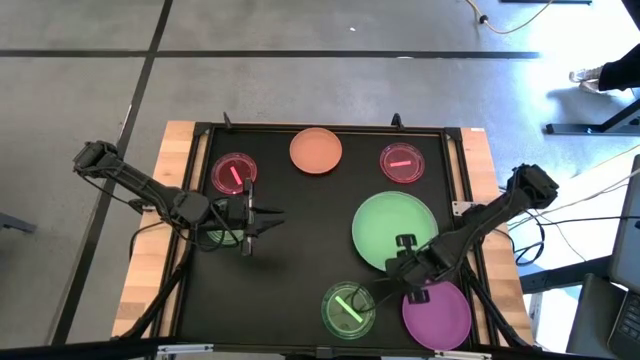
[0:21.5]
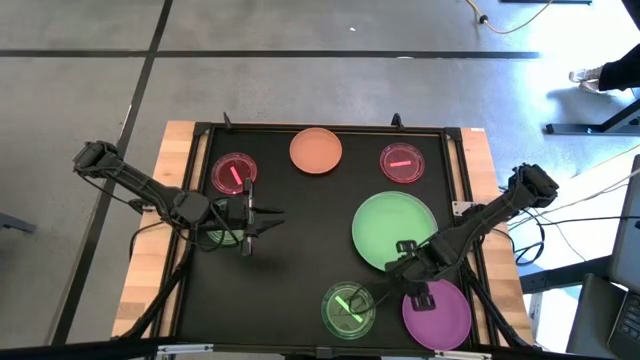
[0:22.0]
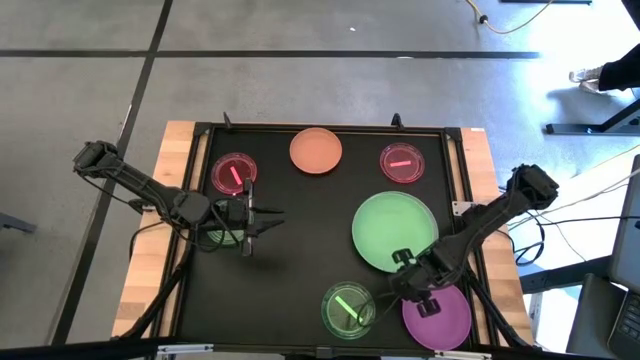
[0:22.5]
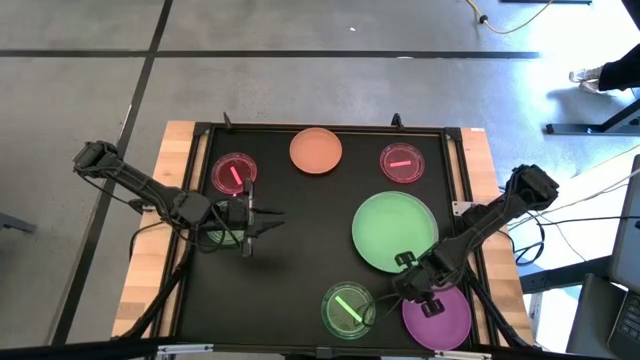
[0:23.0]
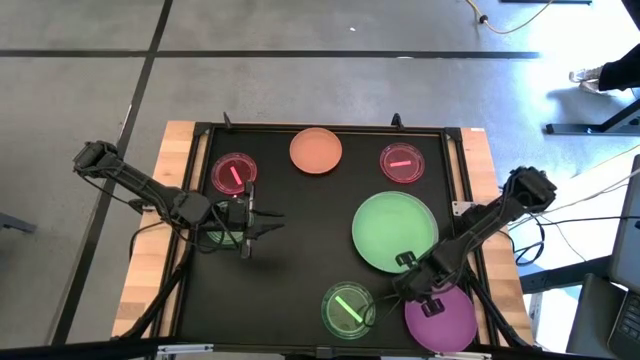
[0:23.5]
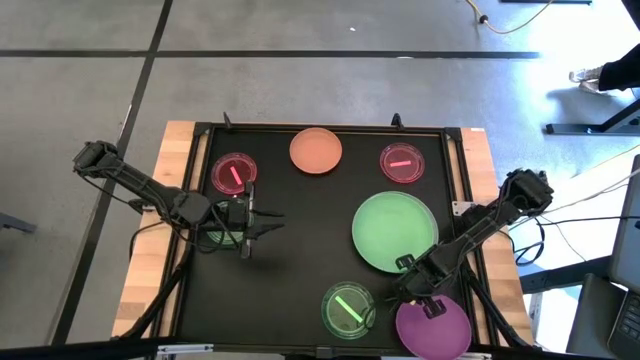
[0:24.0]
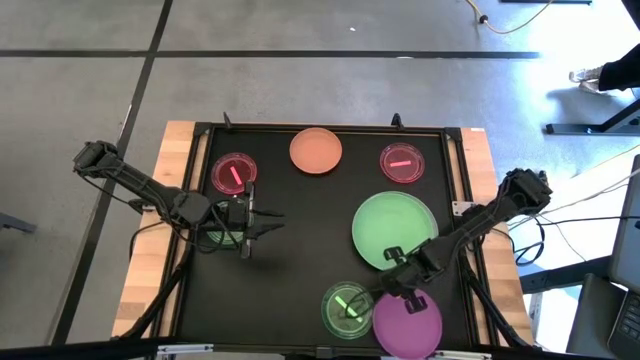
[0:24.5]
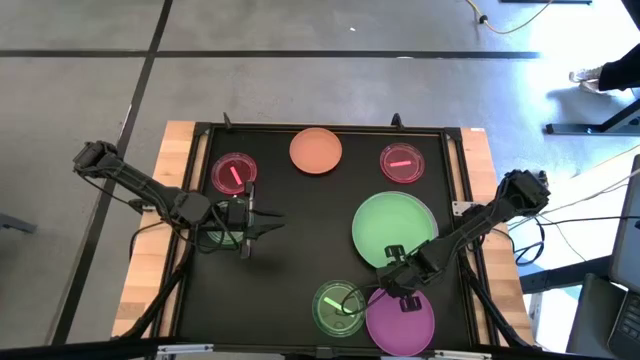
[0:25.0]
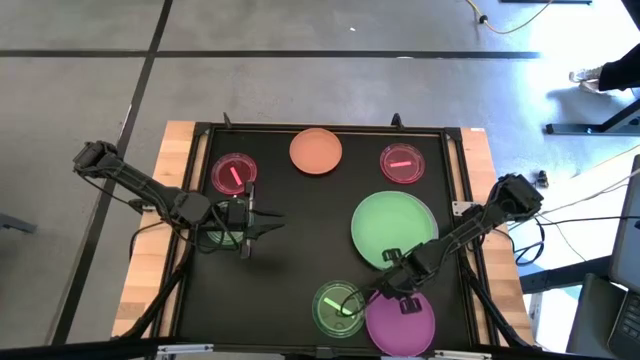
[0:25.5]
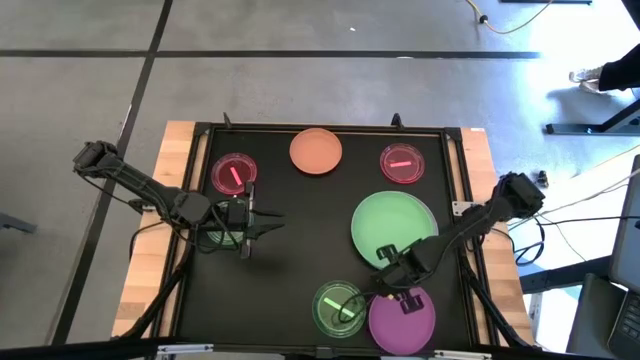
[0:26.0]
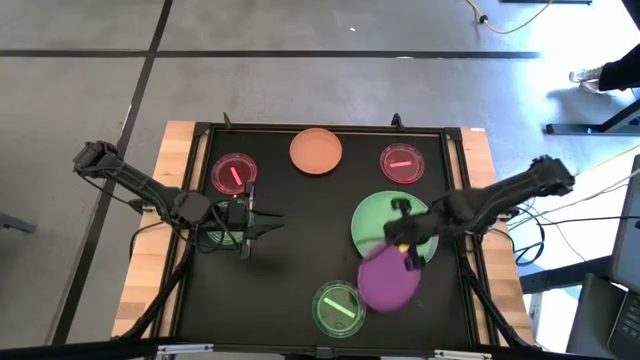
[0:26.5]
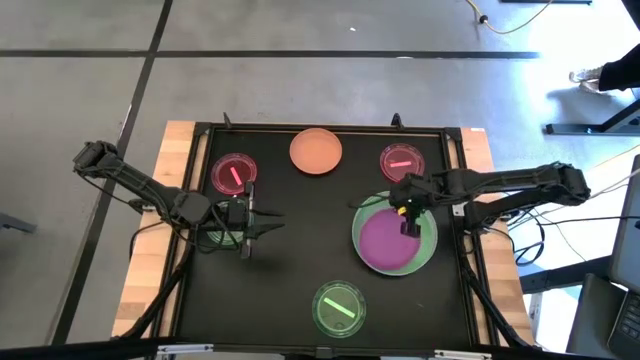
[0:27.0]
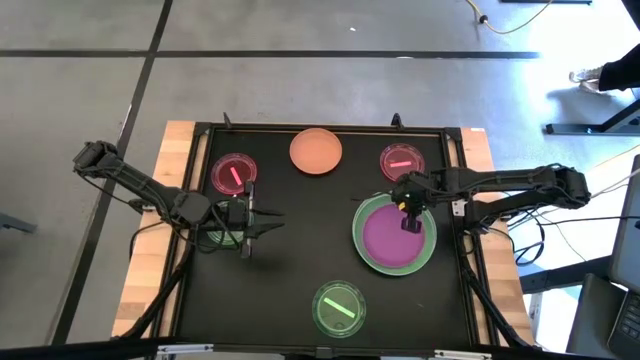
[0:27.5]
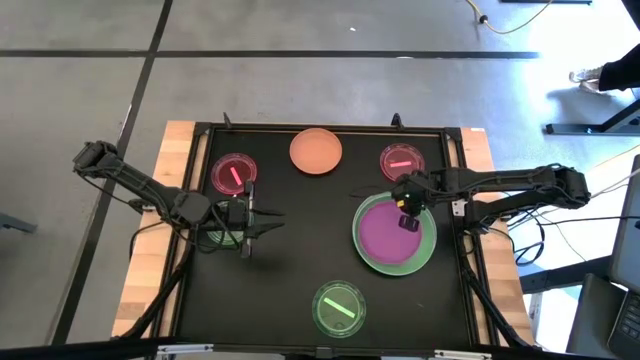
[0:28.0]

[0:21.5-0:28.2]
Task: Stack plastic plates
Stack the purple plate on top of the green plate

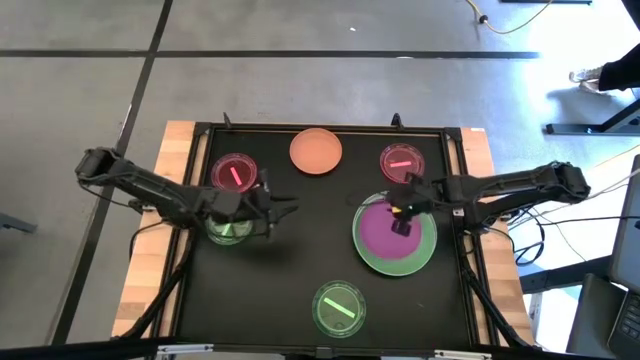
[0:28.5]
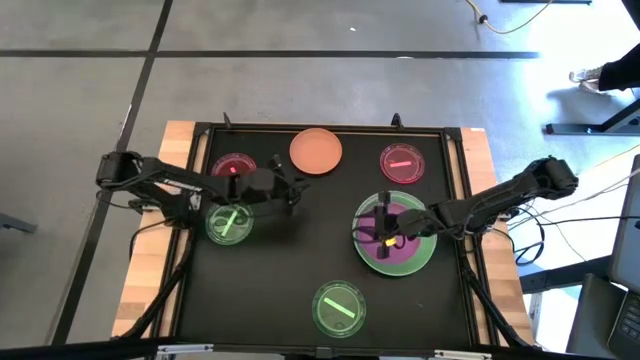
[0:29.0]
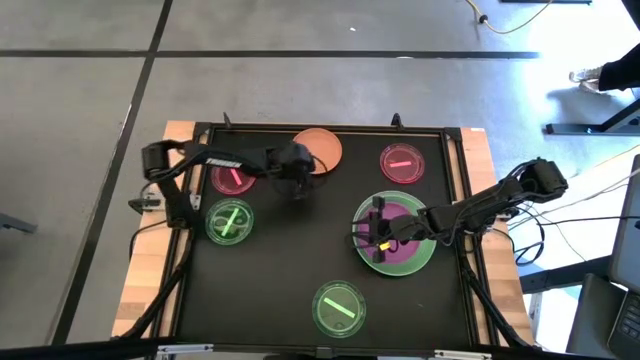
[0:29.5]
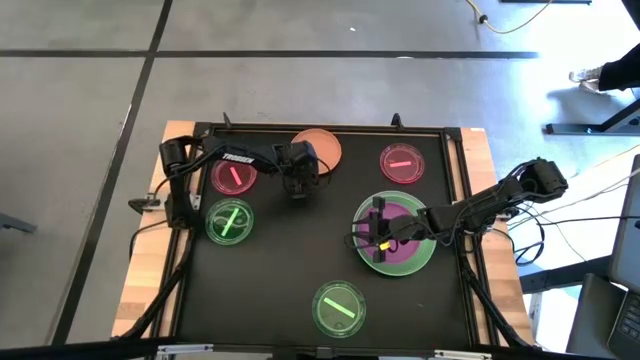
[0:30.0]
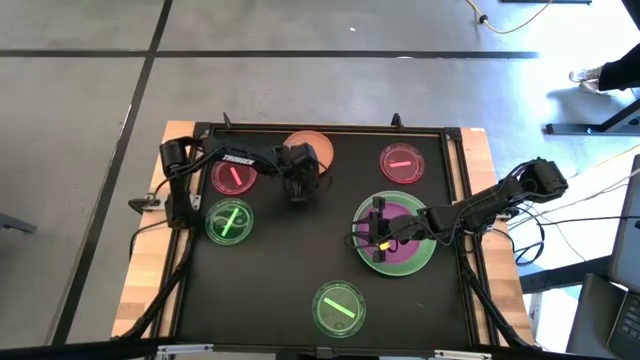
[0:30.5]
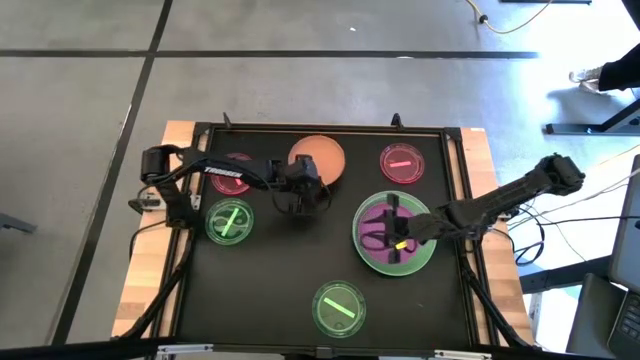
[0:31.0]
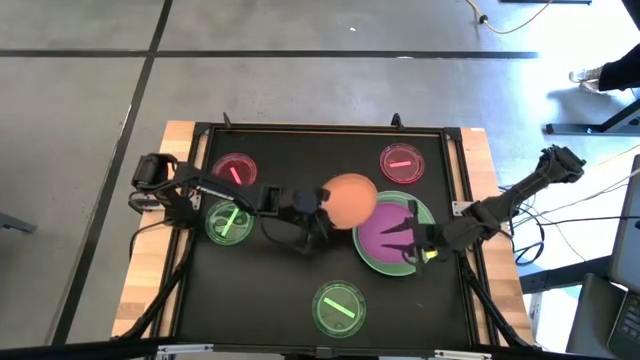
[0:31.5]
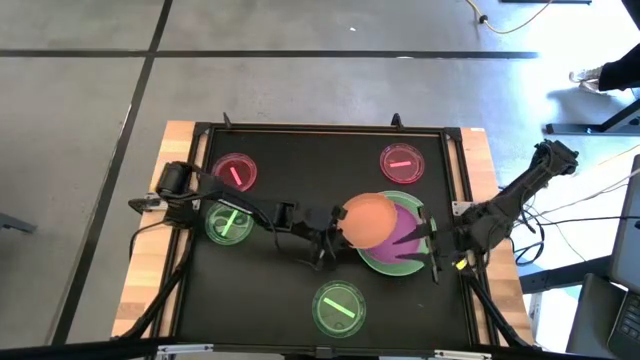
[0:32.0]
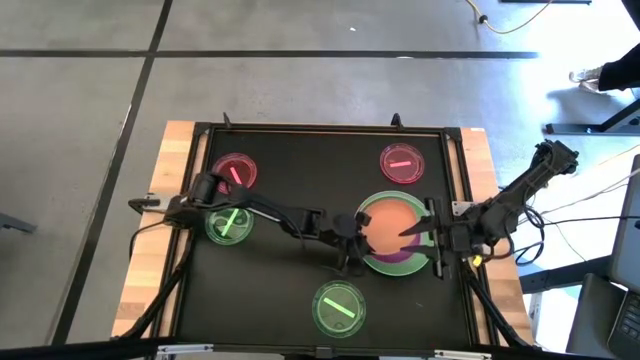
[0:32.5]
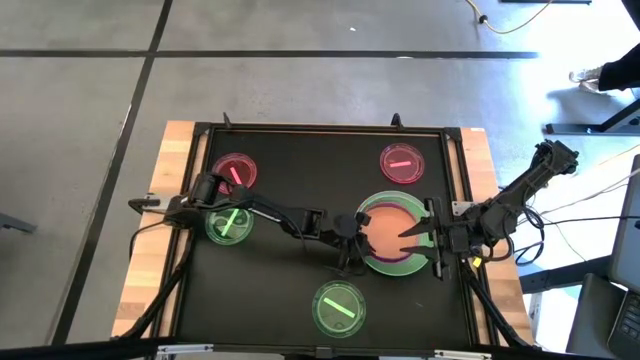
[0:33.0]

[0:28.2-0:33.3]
Stack the orange plate on top of the purple plate

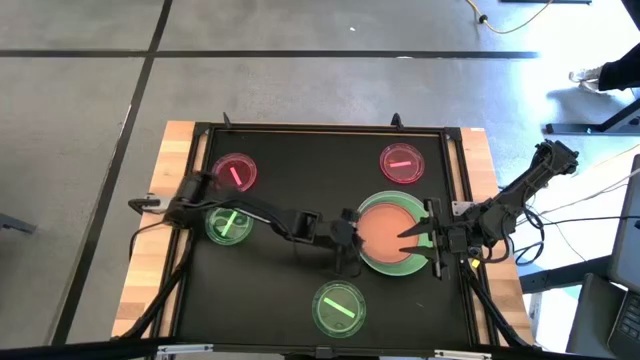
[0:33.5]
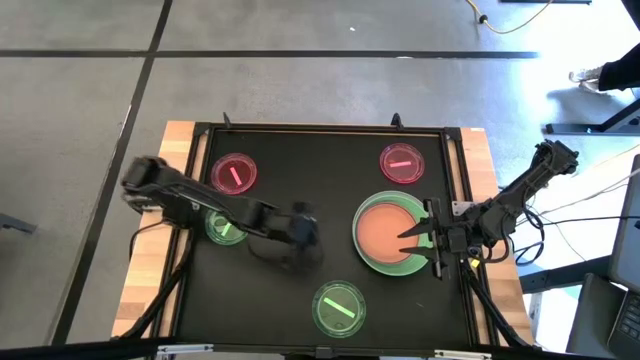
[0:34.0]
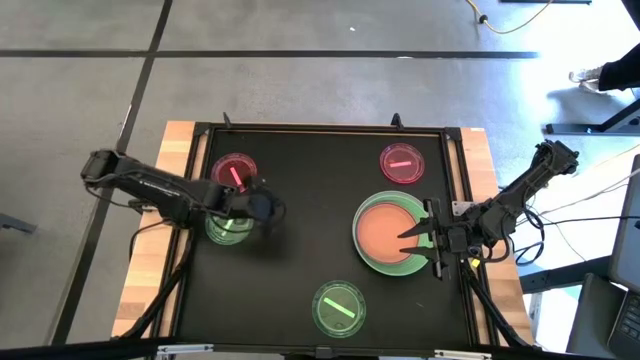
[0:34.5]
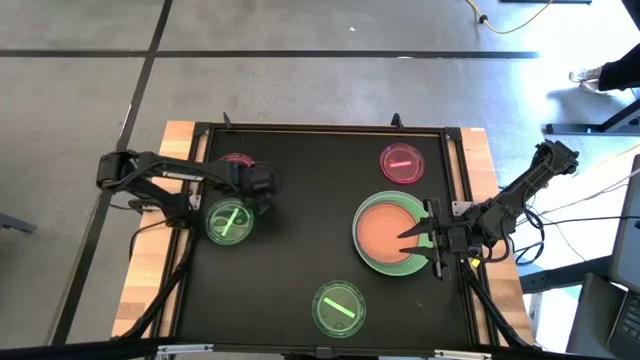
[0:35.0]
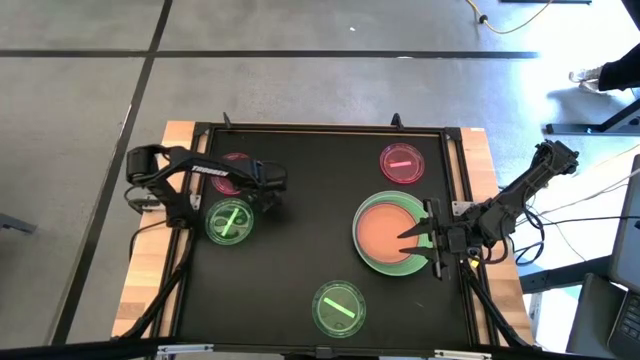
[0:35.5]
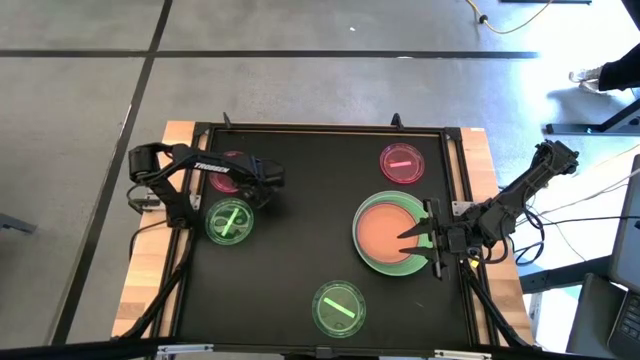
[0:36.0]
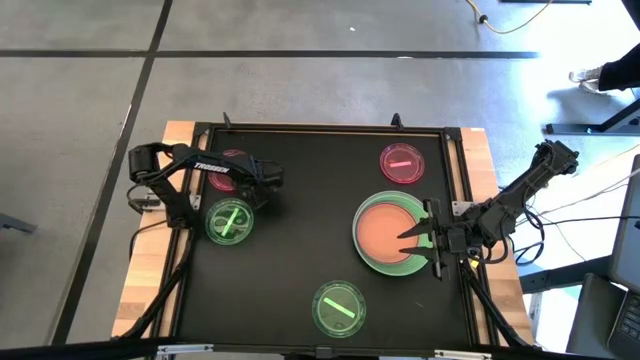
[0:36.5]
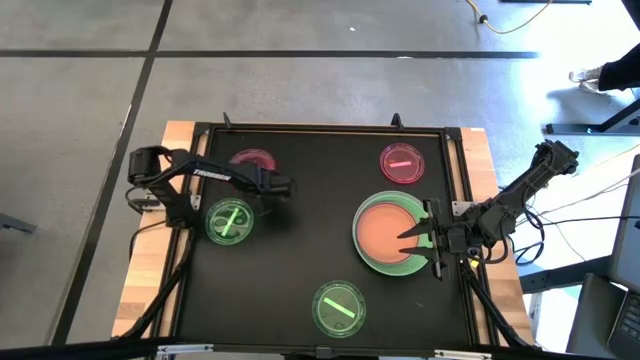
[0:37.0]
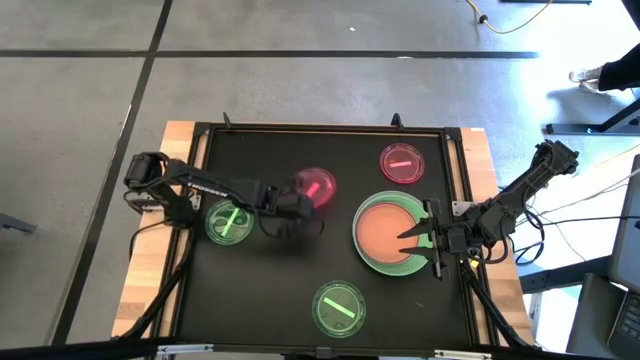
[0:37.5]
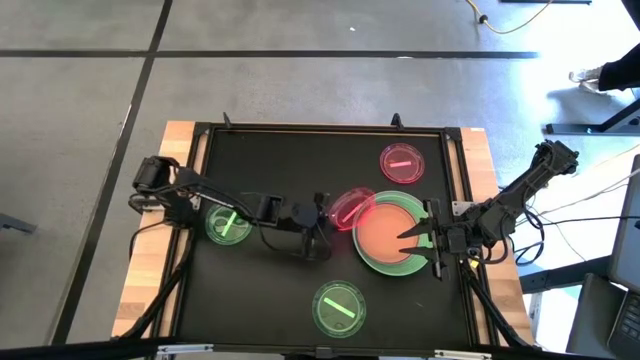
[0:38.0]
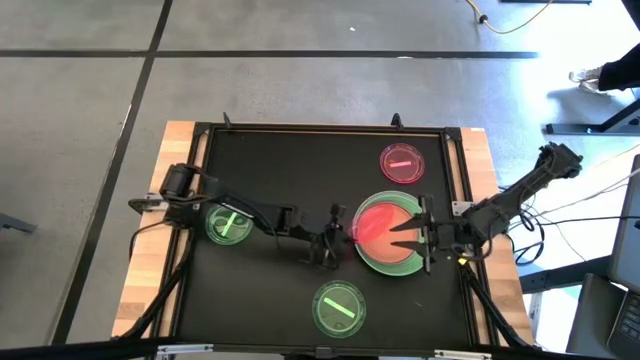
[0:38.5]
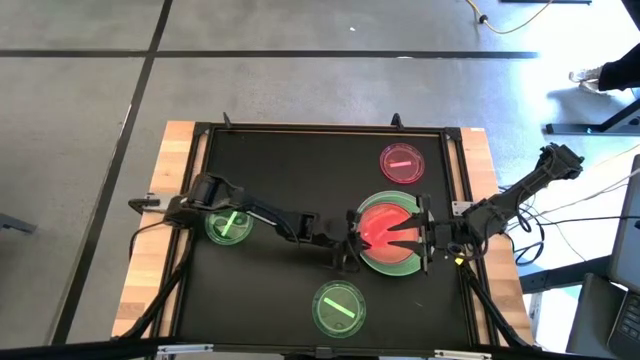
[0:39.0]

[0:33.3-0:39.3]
Stack the left red transparent plate on top of the orange plate

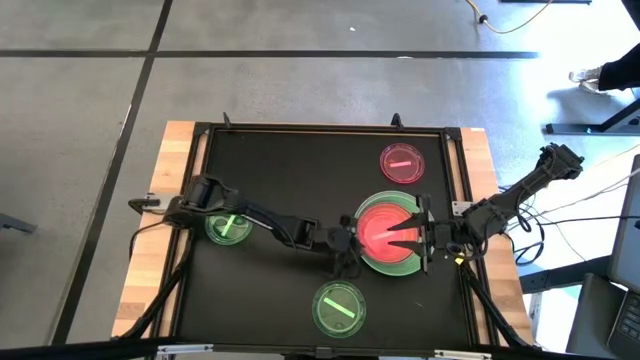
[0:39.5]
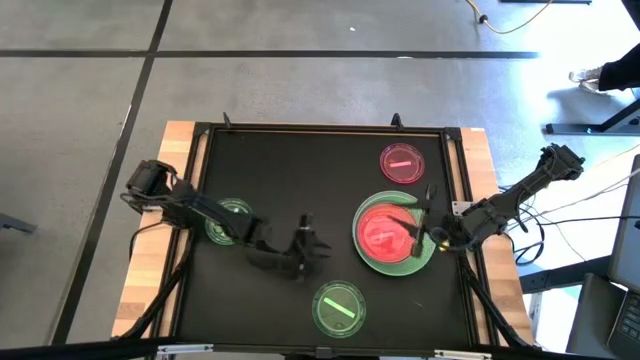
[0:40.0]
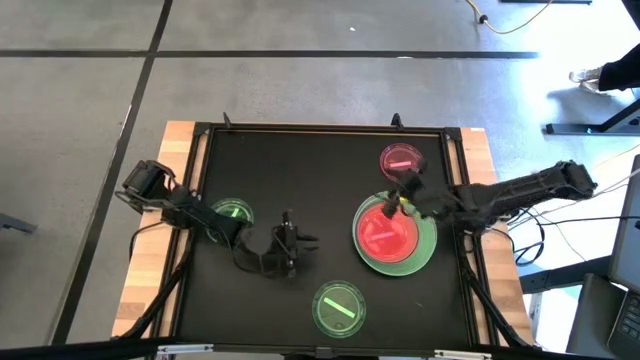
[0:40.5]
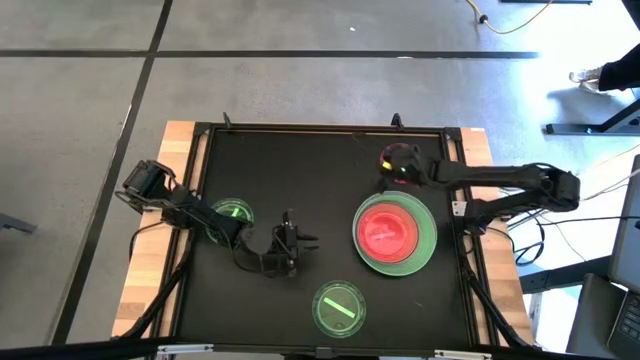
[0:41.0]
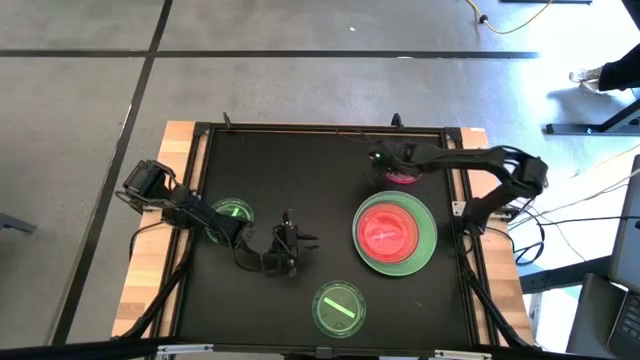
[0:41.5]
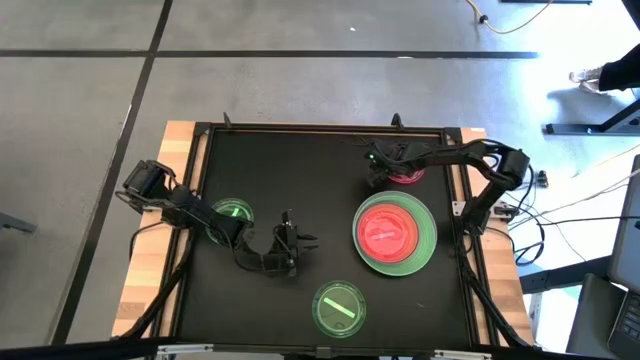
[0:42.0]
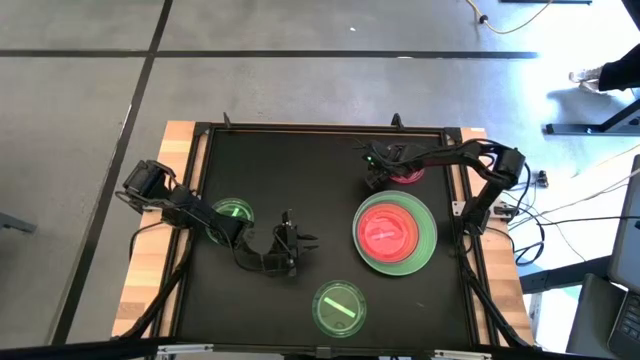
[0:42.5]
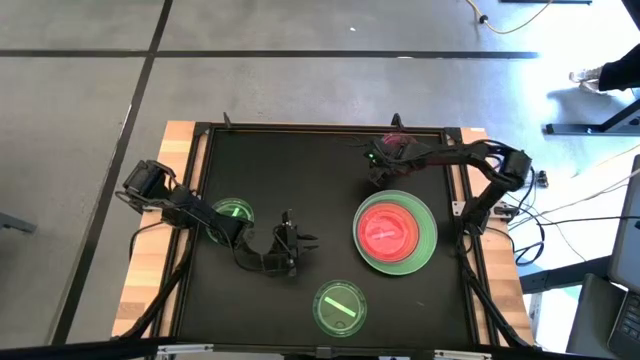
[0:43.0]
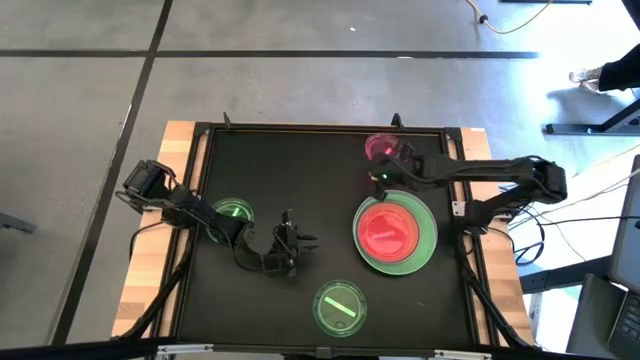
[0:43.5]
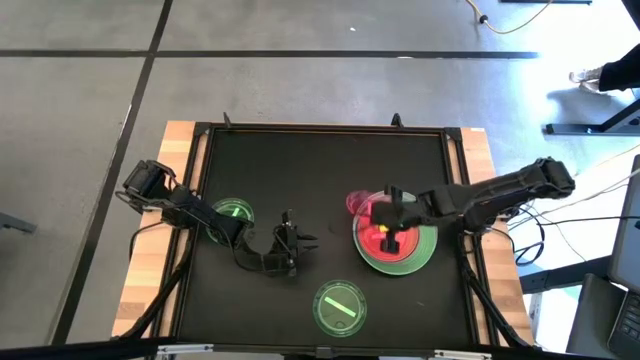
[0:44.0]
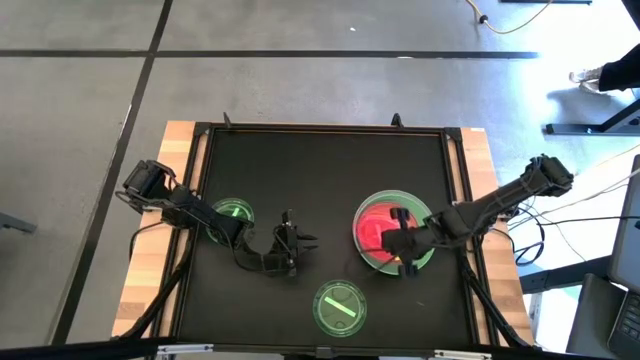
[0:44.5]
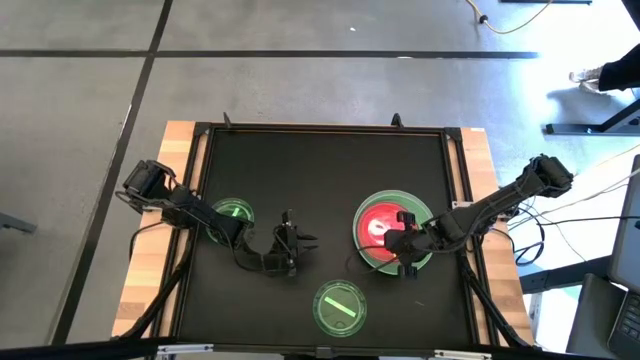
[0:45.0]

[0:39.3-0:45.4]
Stack the red transparent plate on top of the red transparent plate
